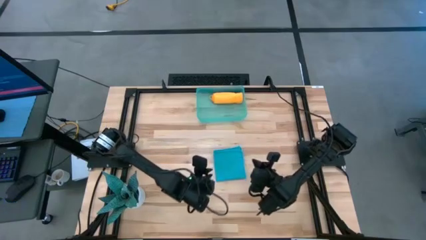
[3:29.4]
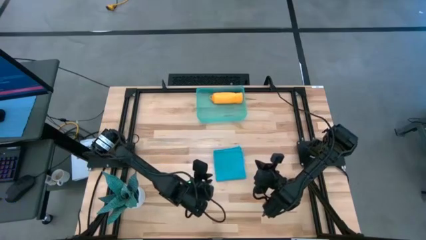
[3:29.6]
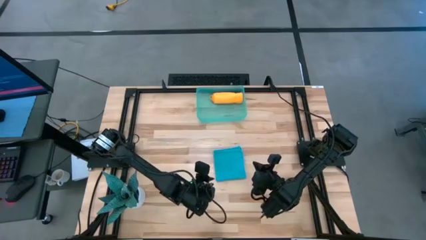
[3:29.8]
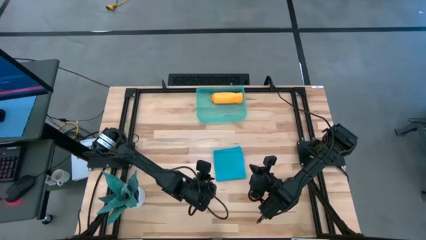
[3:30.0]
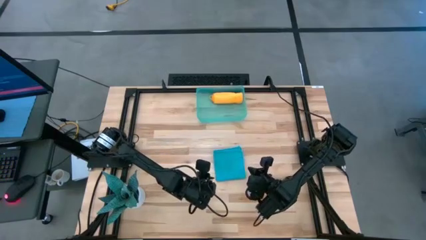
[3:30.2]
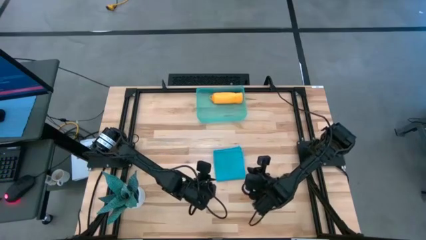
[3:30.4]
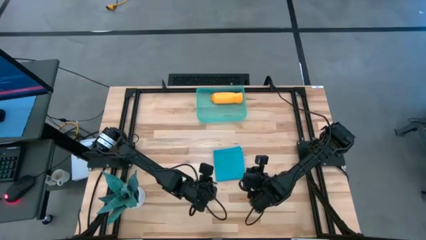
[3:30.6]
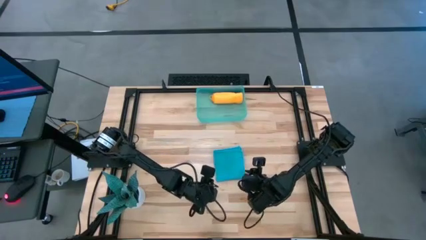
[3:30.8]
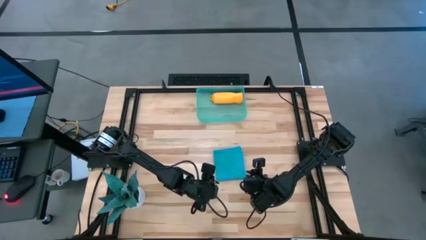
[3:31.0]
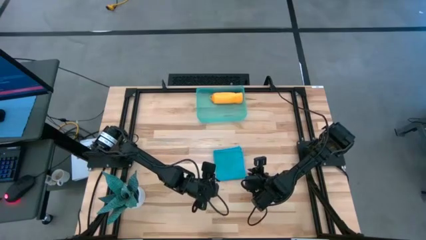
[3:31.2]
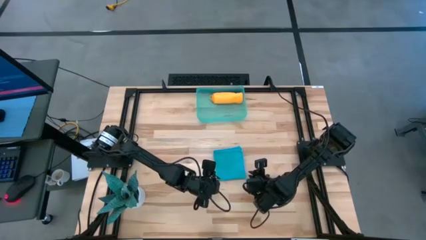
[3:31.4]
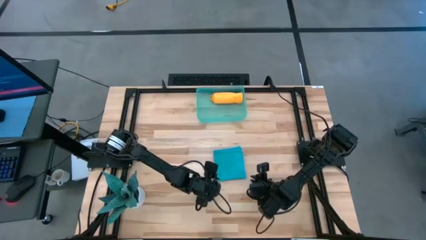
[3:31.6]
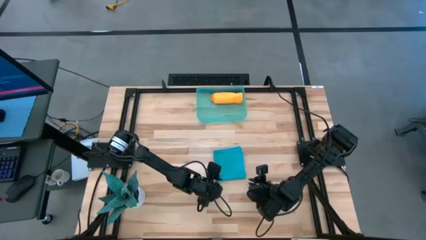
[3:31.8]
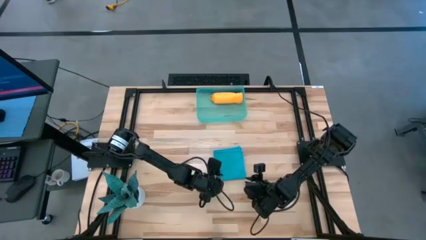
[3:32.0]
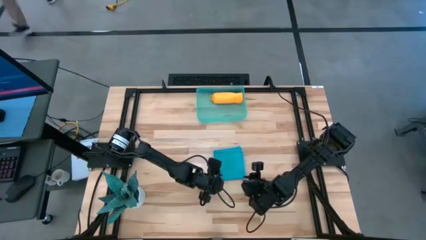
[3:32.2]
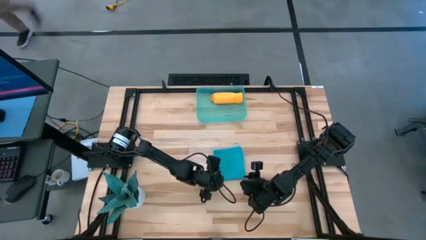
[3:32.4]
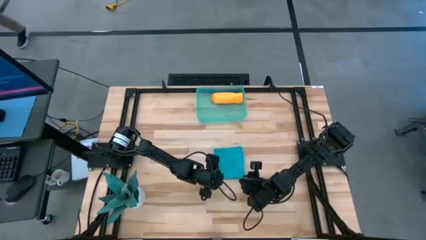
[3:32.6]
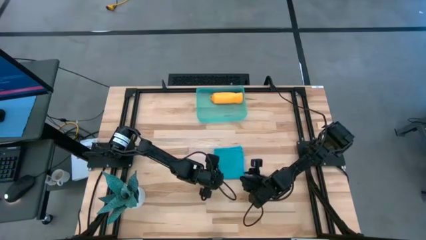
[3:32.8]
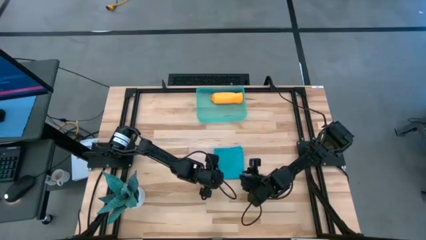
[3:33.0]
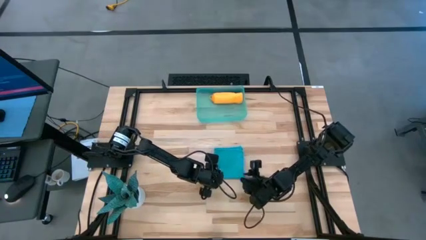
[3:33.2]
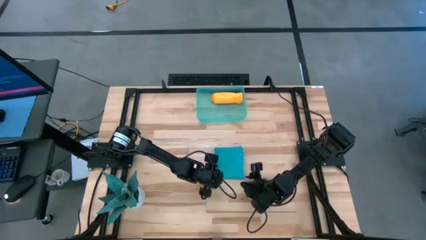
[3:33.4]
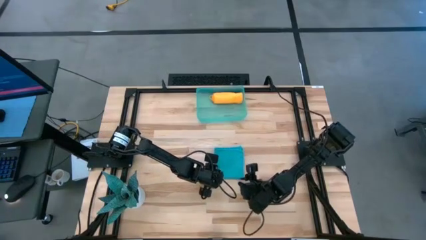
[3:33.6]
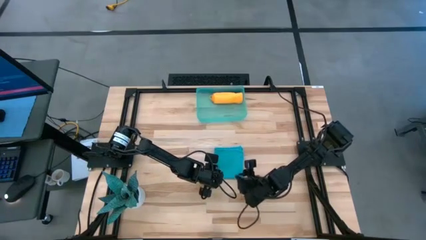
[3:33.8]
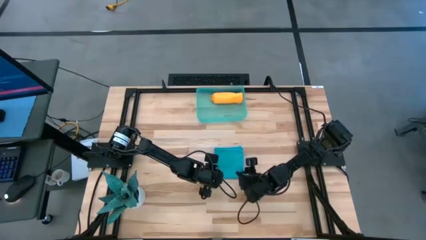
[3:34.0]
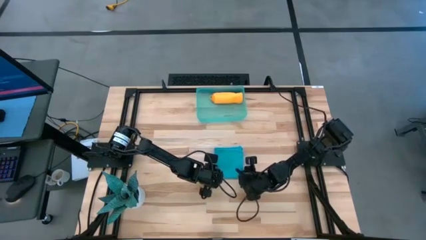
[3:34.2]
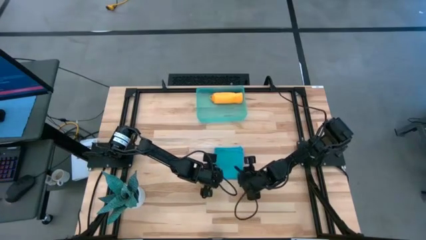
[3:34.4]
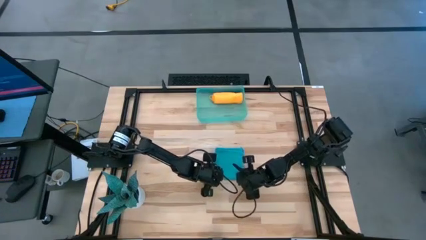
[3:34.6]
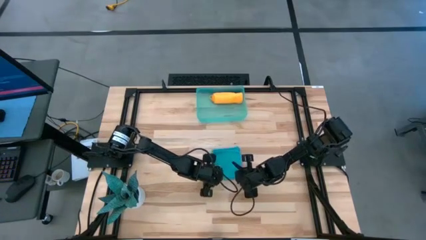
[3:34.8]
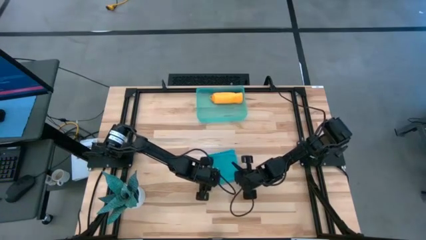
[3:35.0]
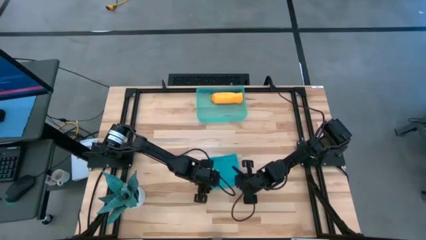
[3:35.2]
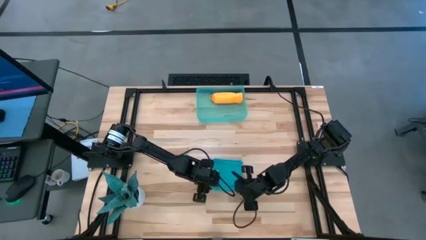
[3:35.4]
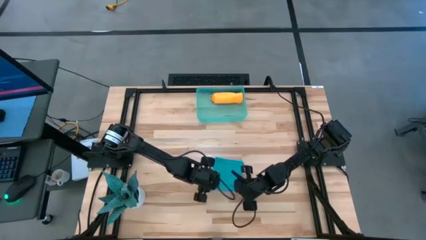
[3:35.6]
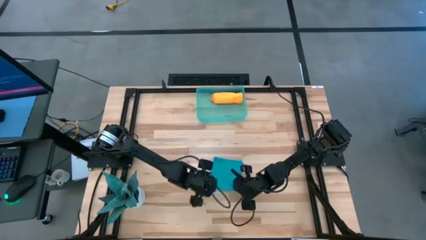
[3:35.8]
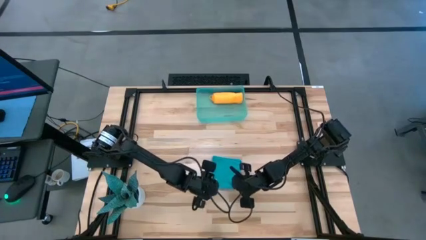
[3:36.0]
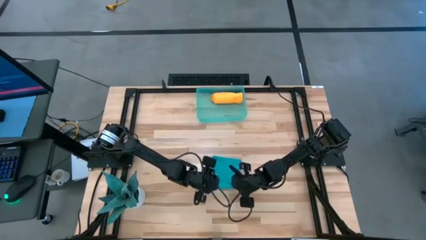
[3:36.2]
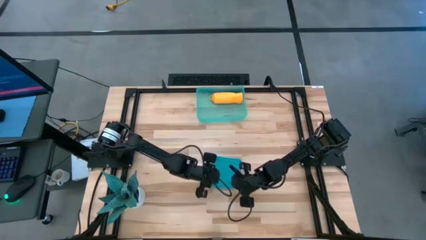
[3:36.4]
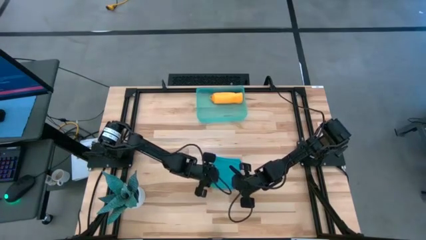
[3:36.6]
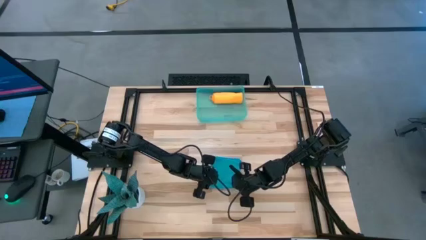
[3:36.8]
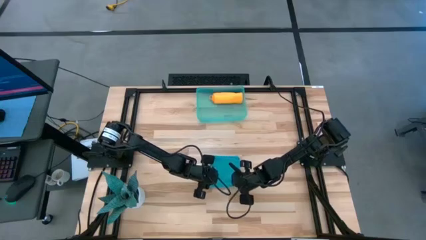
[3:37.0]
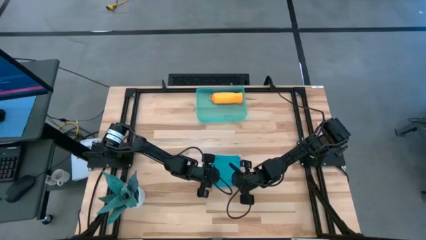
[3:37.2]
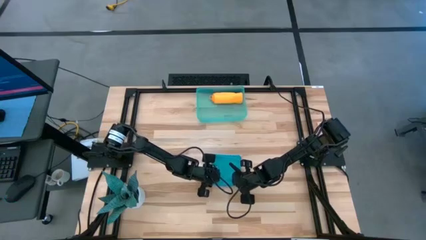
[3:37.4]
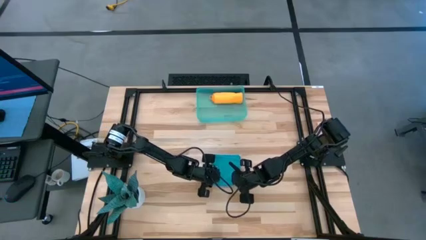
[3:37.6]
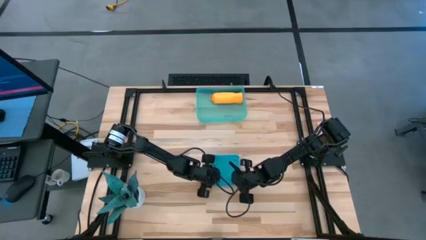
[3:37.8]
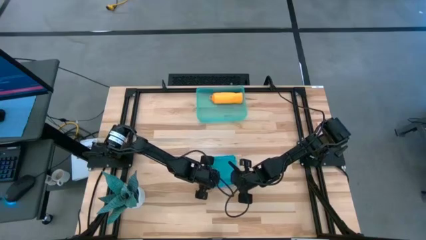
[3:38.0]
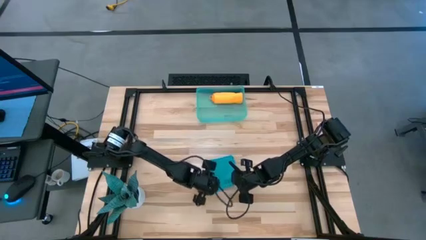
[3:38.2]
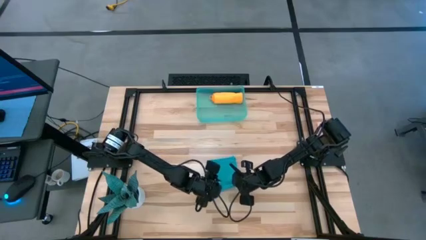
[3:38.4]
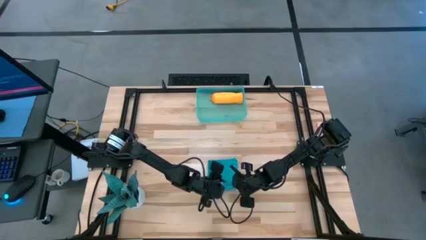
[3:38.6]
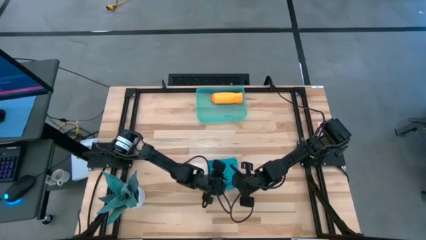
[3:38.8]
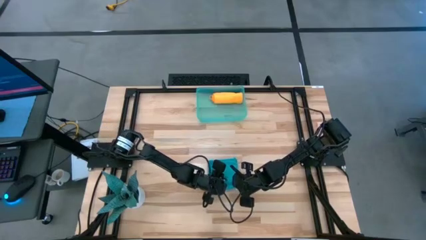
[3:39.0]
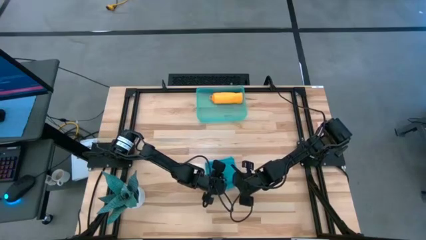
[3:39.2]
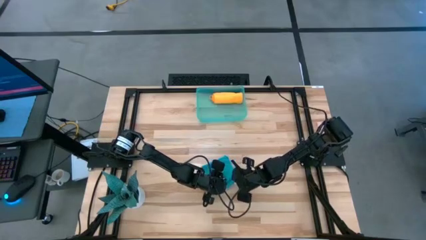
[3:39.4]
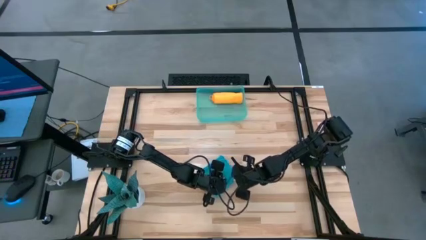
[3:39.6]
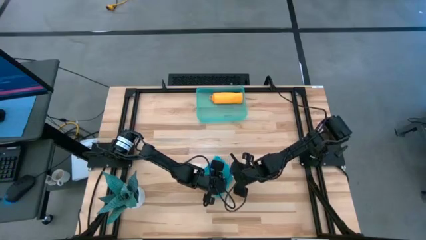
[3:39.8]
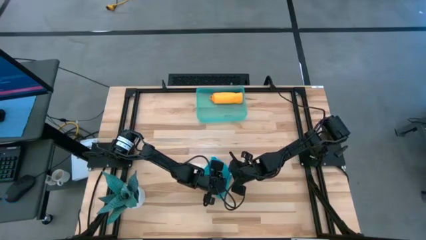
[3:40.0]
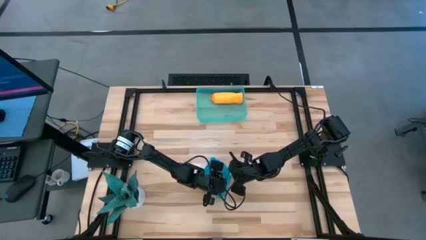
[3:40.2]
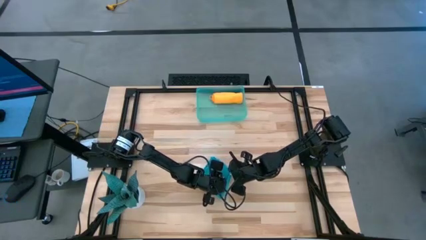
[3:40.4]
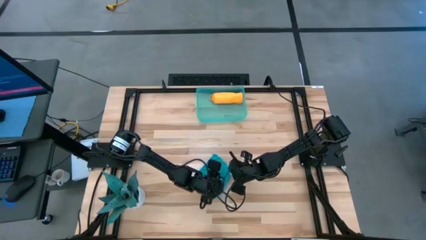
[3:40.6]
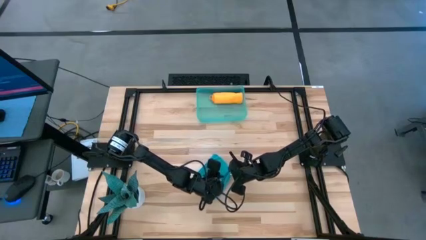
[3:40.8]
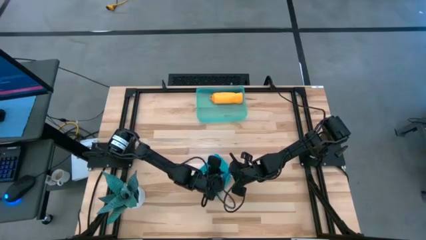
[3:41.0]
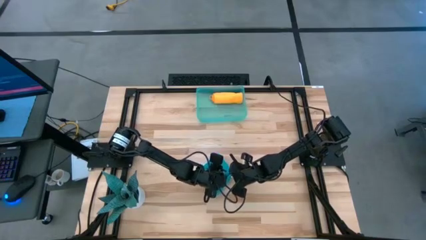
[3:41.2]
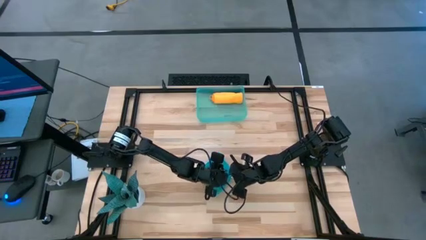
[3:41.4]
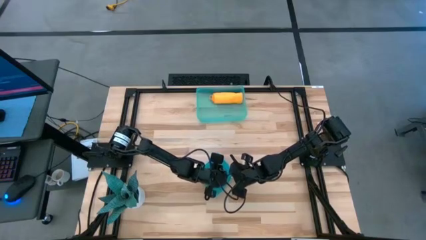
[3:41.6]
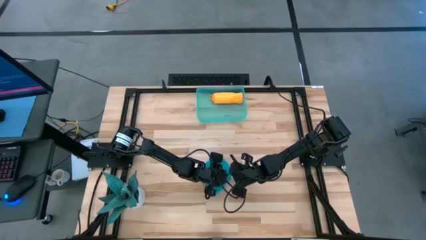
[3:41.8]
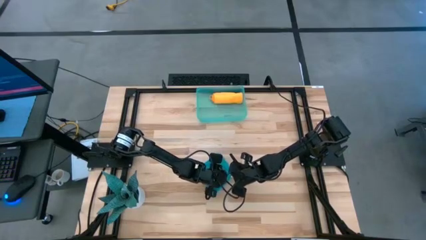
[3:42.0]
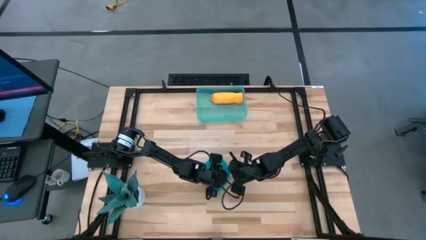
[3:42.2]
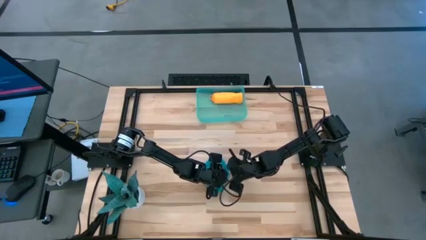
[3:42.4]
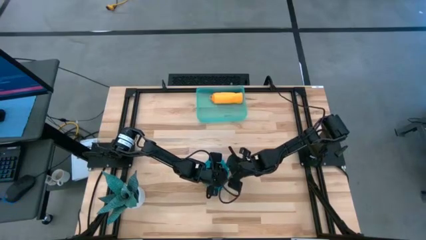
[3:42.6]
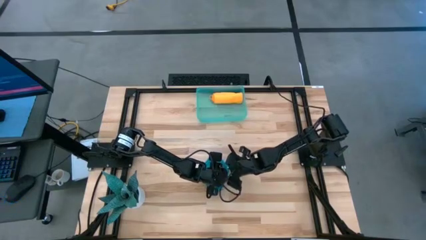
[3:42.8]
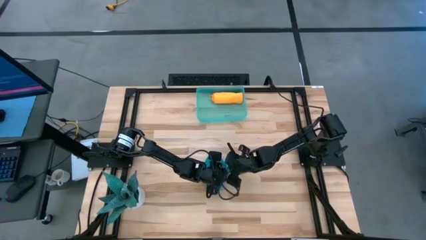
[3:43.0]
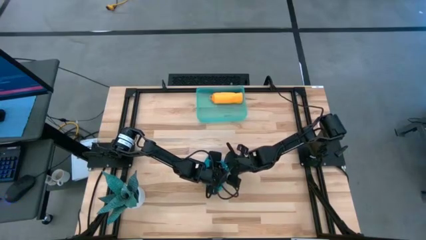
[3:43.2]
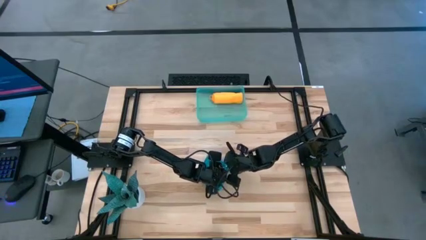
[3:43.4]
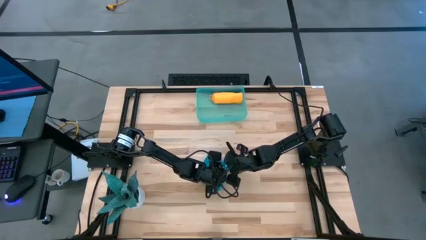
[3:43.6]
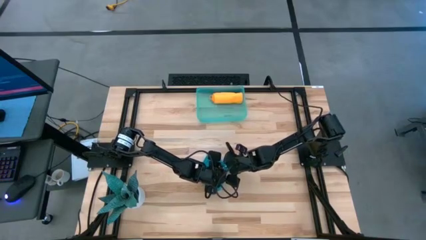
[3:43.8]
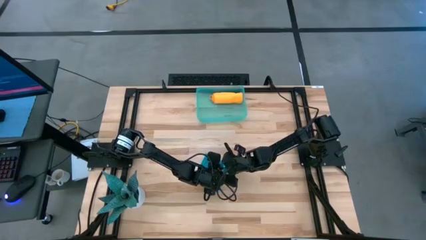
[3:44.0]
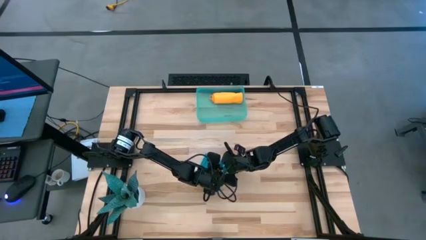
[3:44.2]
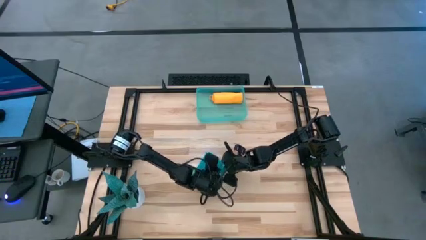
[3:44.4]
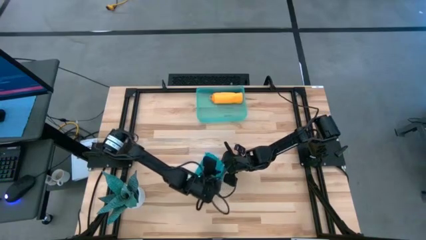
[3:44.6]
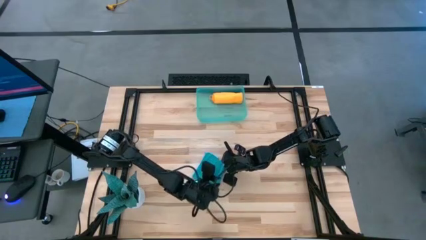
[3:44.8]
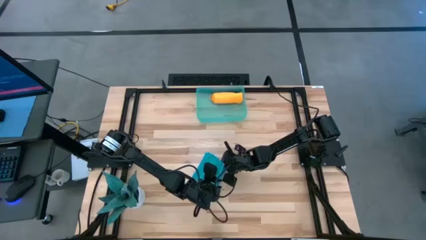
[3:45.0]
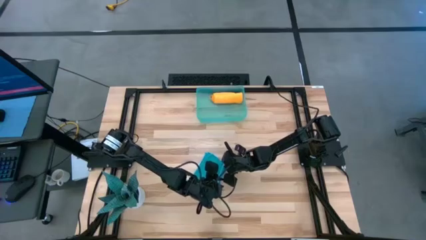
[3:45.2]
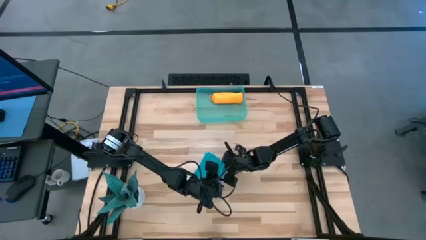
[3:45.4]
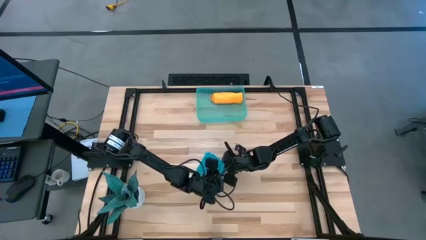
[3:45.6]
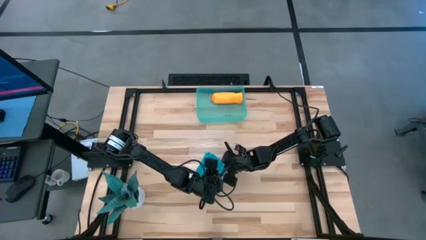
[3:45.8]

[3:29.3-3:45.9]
Task: Roll microfiber towels into tight, uniform cylinder then place into a basket
Roll the blue microfiber cloth on the table
